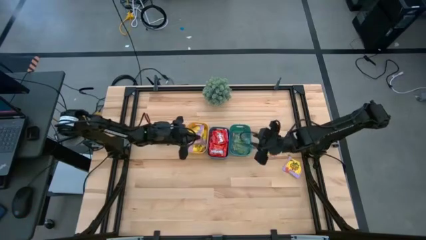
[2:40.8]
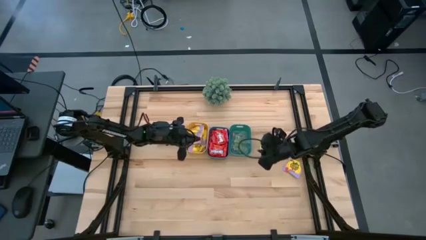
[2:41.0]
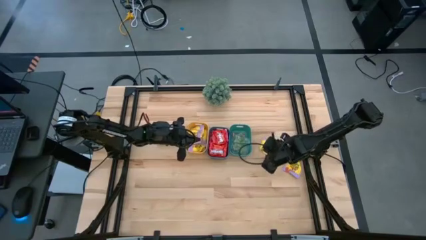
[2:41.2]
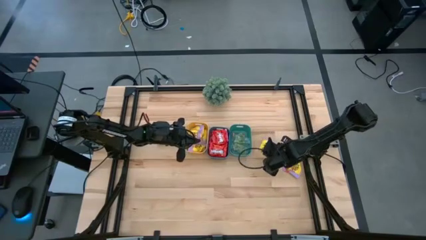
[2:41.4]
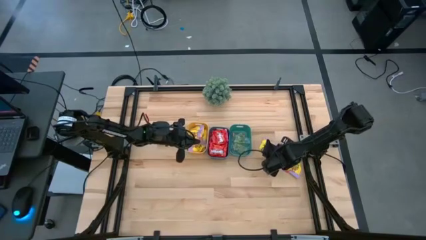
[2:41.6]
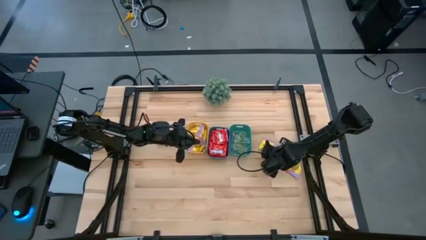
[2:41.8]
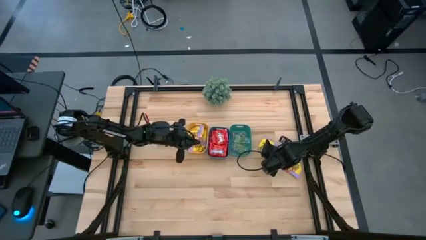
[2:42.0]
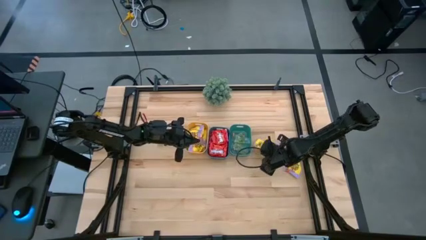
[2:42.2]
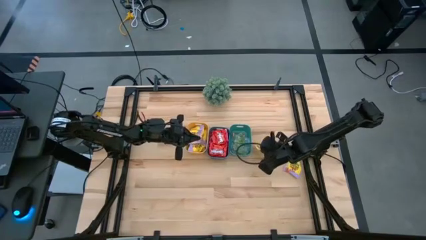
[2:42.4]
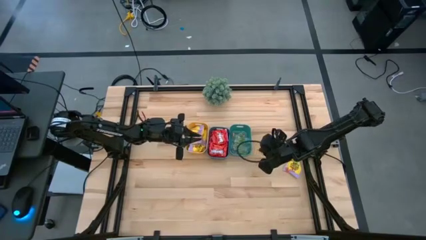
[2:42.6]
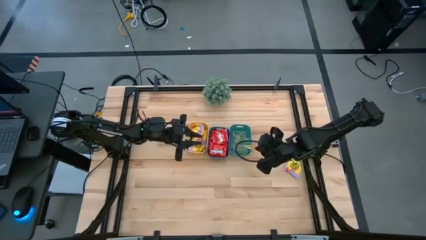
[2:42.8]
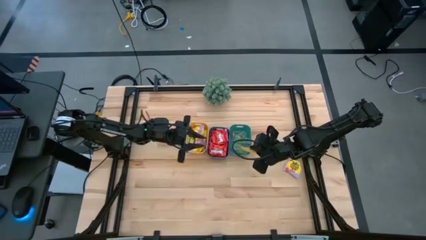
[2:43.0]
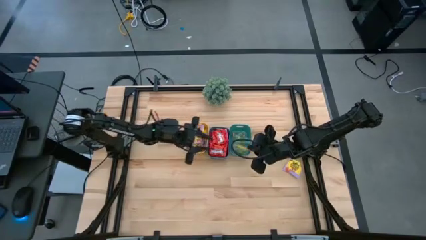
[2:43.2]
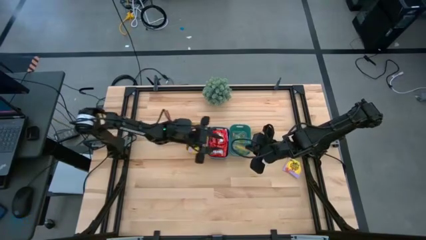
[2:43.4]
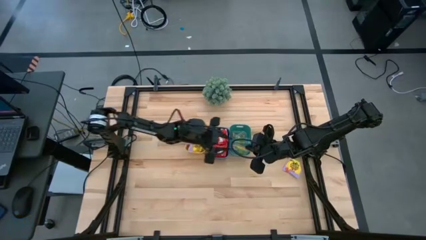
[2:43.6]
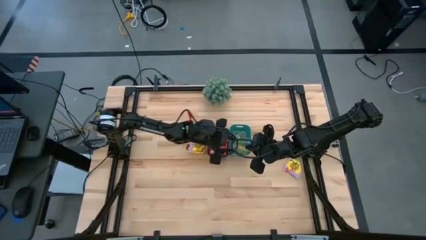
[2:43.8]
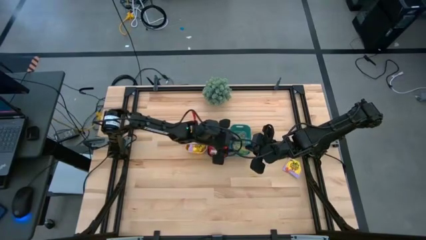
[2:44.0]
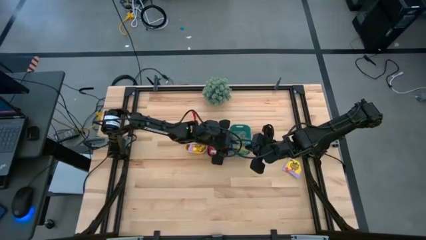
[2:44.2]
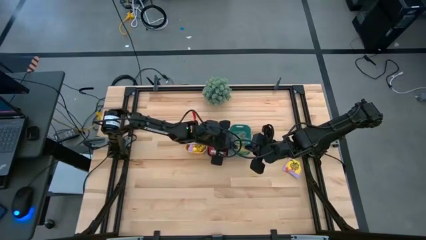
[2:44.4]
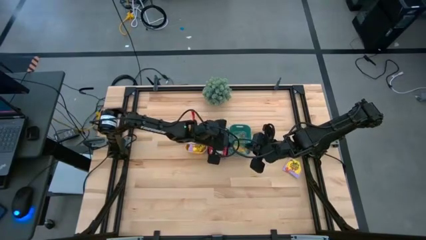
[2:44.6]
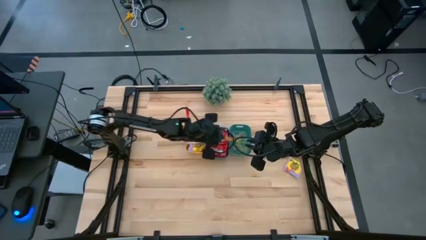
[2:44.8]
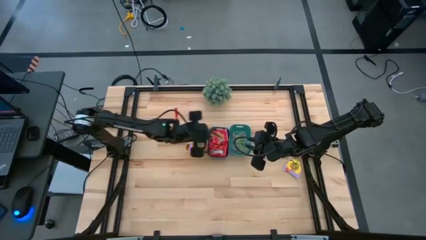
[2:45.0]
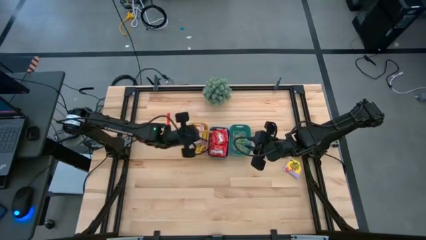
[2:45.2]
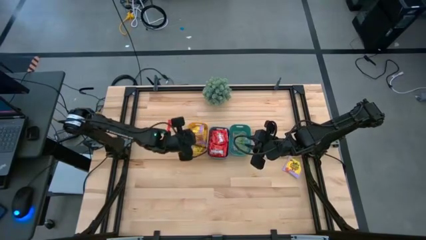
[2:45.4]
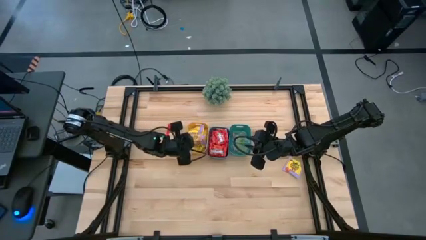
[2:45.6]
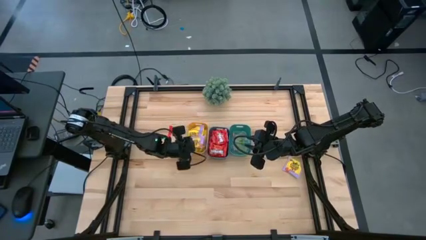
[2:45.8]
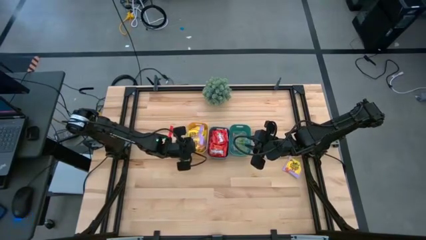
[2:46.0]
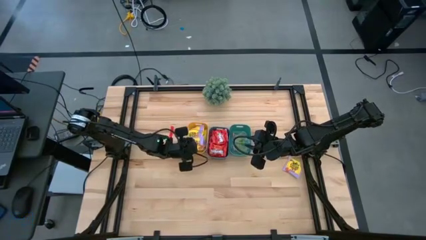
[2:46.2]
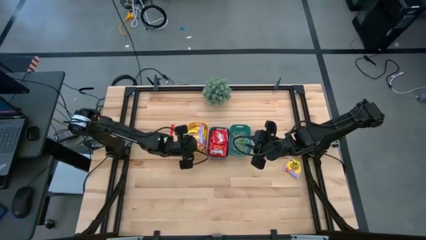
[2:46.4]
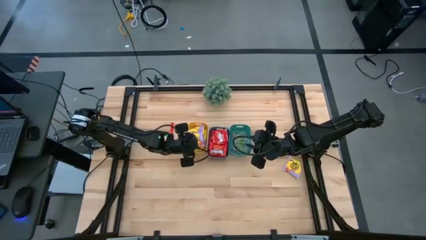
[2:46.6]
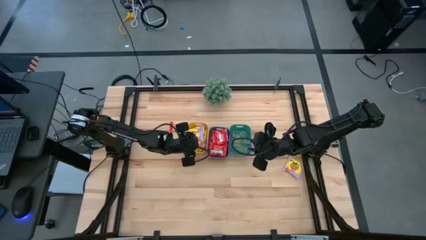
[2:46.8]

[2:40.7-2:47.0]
Task: Sort candy
Put the yellow candy pack into the yellow bin

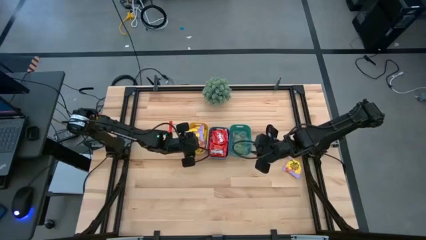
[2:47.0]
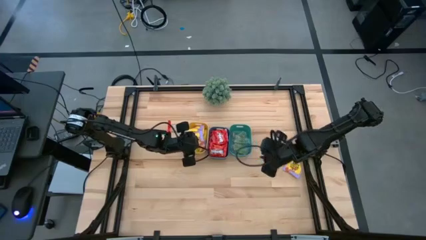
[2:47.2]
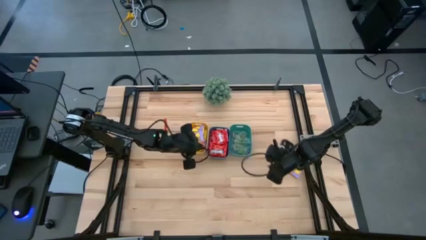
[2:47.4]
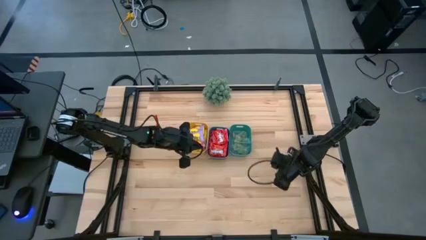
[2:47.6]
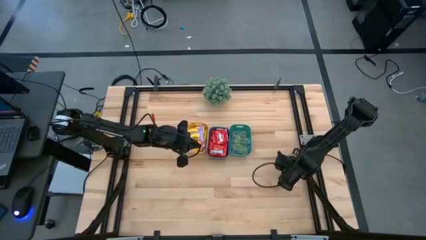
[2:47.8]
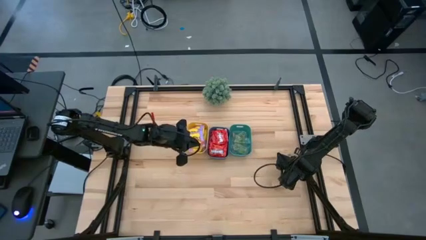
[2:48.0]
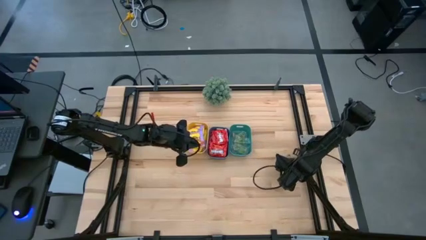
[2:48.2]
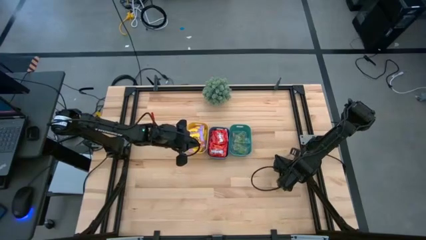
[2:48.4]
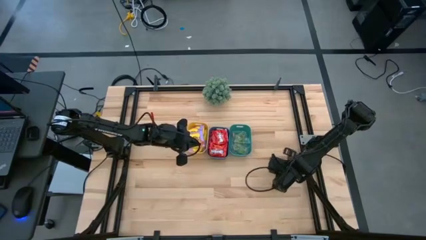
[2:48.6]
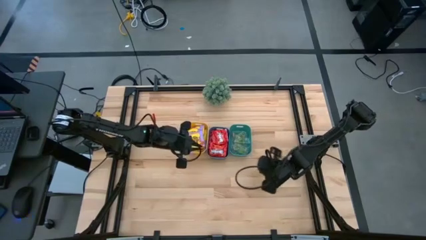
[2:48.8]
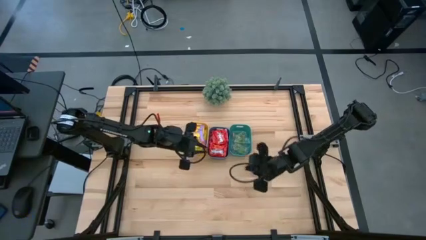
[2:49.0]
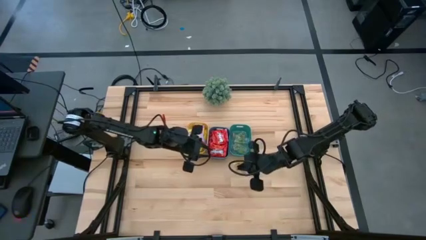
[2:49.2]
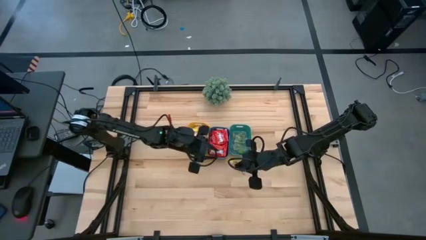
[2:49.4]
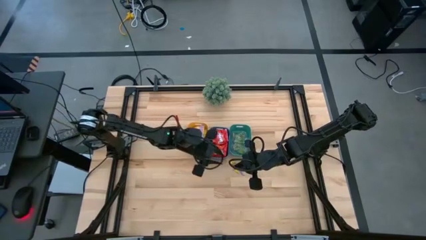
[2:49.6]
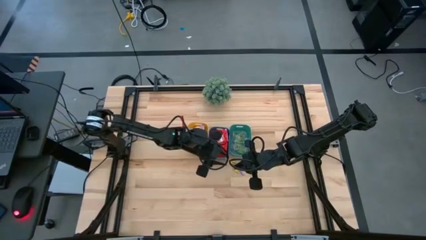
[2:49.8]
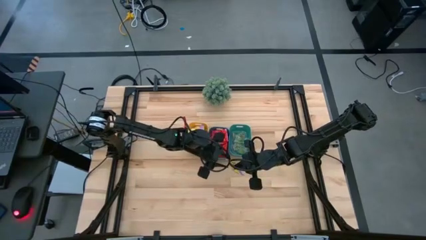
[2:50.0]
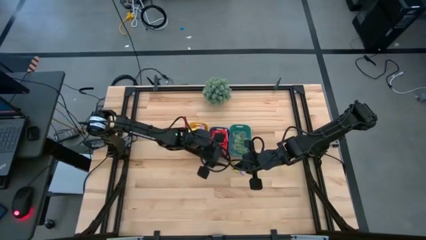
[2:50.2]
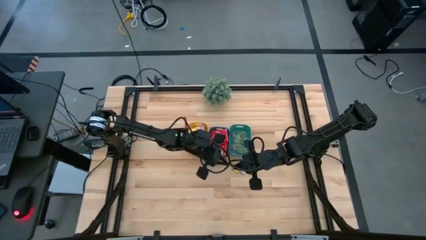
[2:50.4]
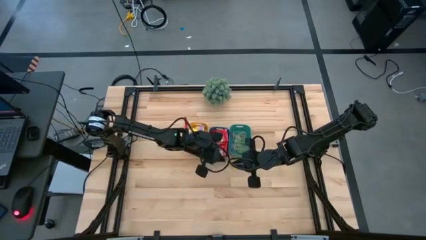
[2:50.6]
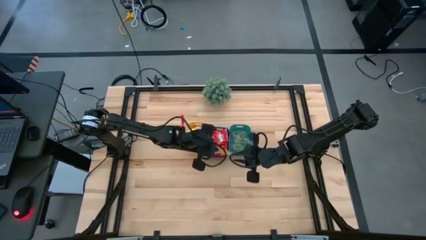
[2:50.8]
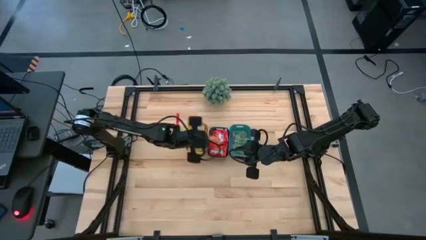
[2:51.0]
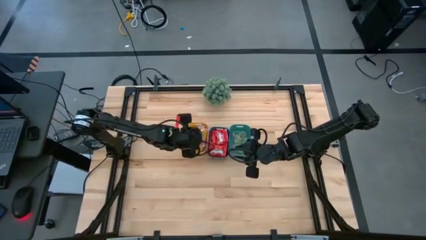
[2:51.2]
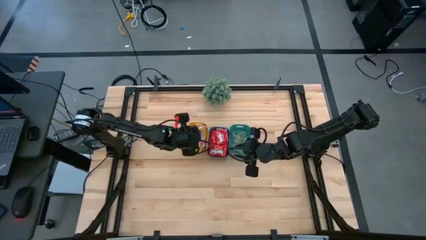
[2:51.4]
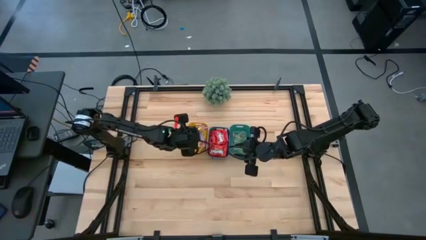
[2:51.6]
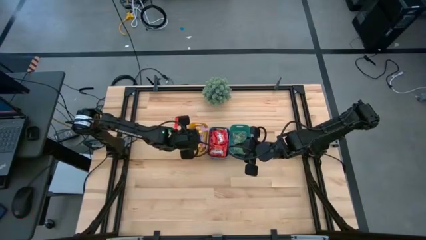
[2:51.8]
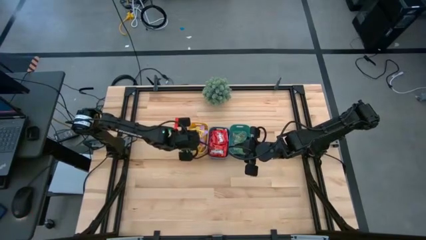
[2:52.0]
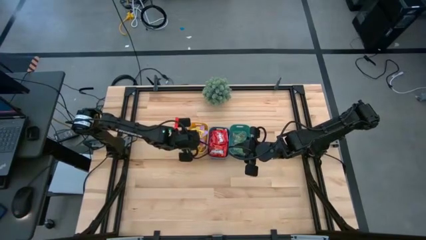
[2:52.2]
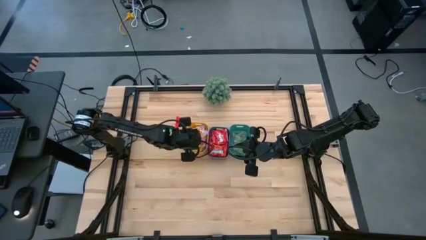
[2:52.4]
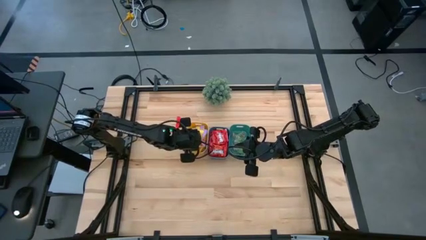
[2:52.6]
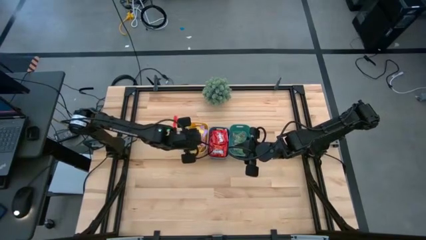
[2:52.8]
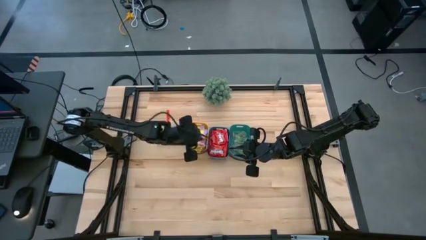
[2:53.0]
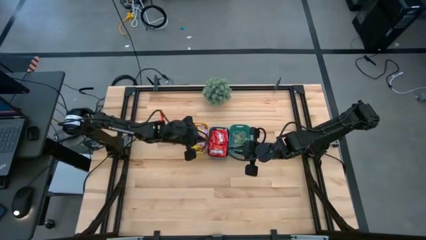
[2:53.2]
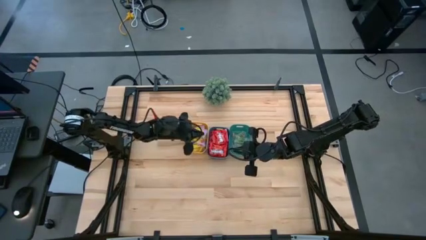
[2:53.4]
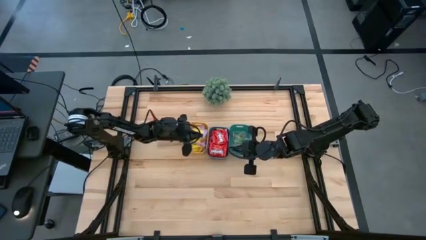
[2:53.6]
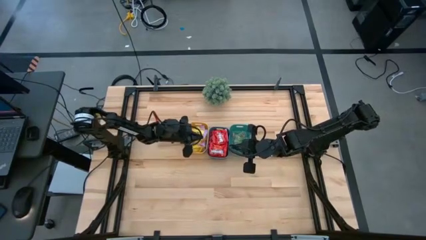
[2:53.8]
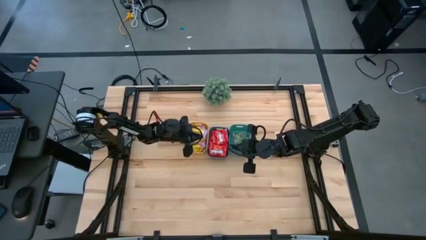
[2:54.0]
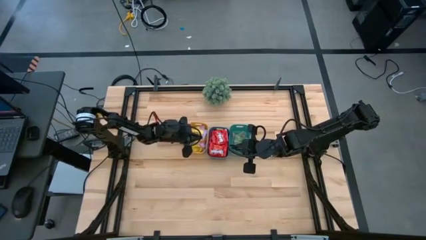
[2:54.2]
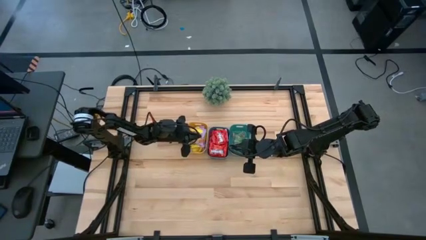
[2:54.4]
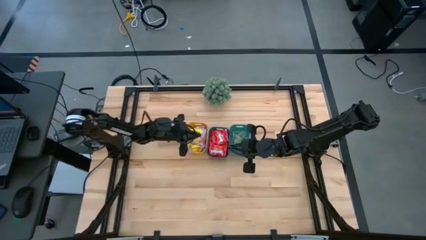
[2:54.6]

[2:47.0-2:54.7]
Put the yellow candy pack into the yellow bin

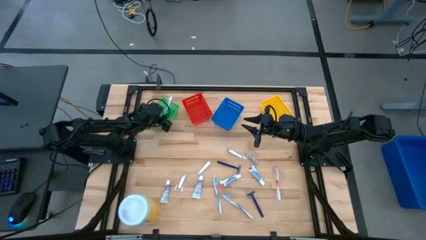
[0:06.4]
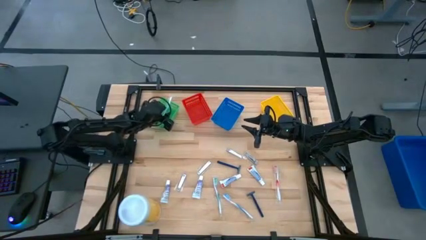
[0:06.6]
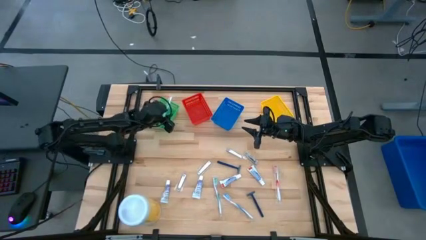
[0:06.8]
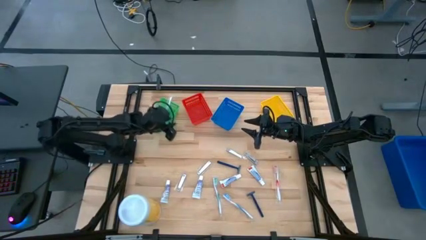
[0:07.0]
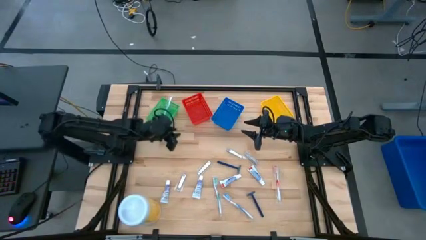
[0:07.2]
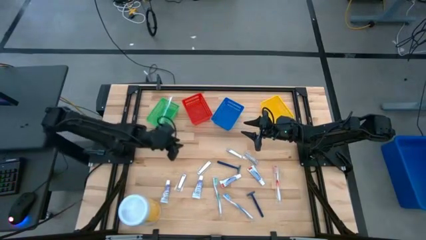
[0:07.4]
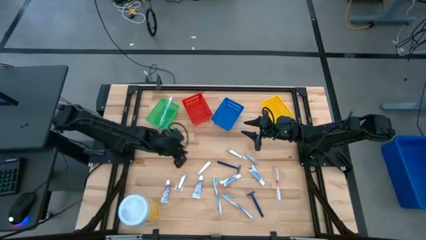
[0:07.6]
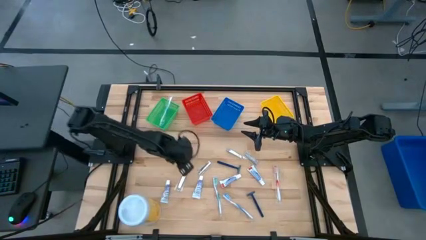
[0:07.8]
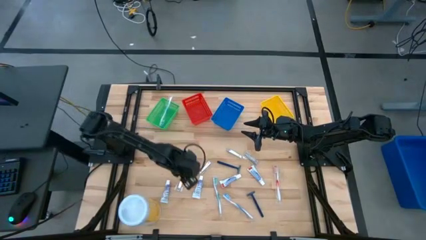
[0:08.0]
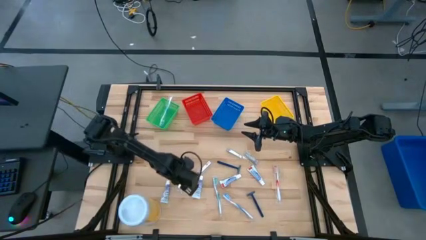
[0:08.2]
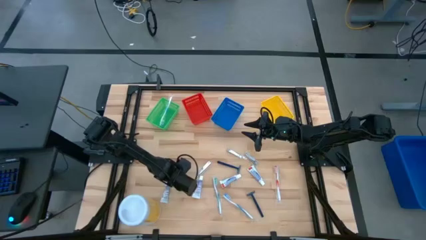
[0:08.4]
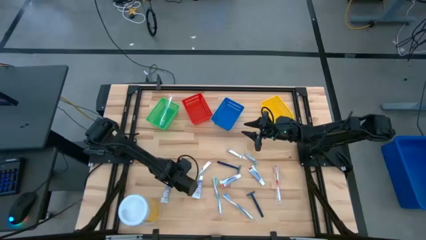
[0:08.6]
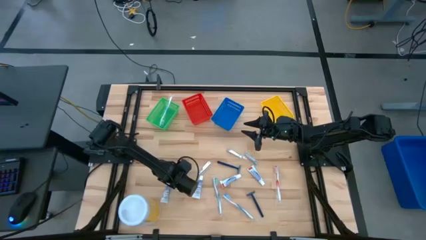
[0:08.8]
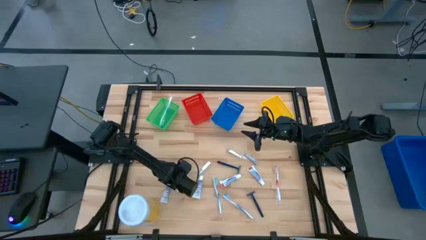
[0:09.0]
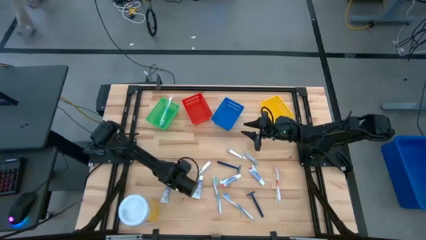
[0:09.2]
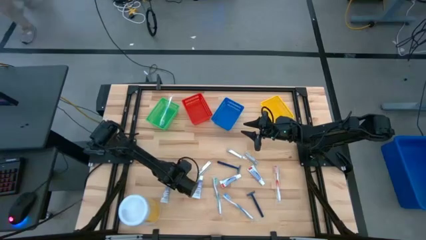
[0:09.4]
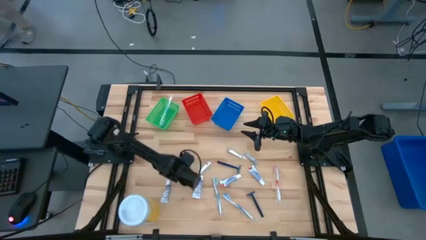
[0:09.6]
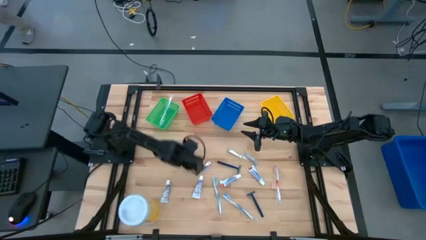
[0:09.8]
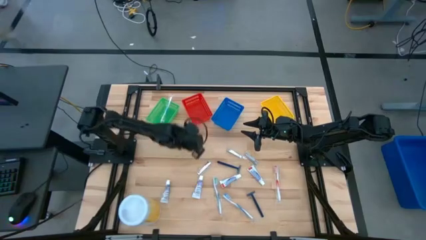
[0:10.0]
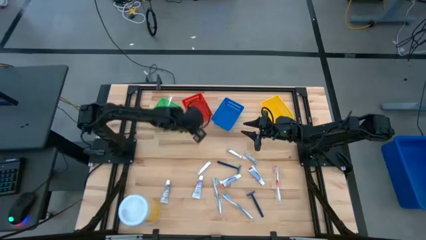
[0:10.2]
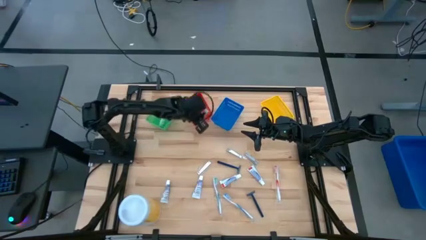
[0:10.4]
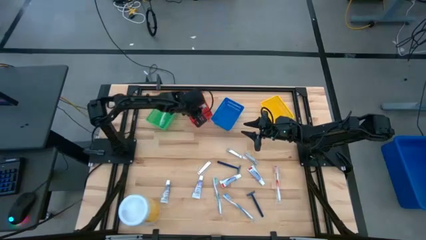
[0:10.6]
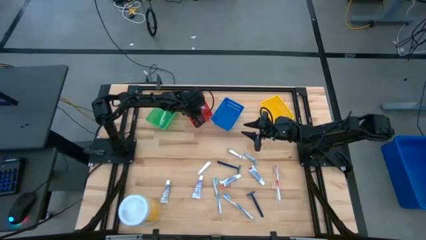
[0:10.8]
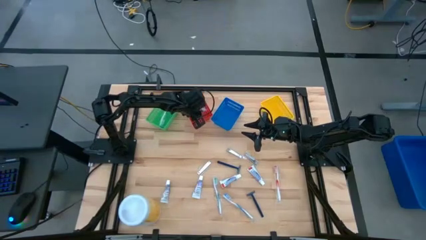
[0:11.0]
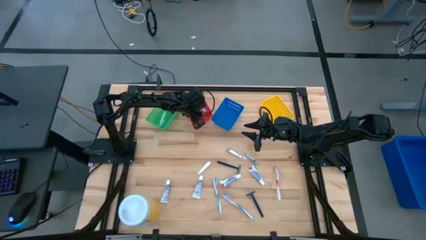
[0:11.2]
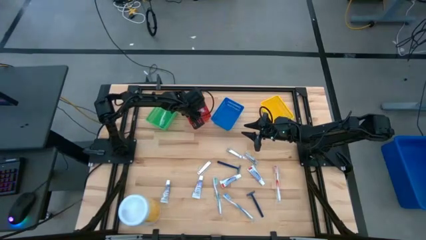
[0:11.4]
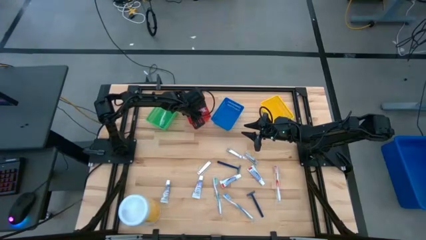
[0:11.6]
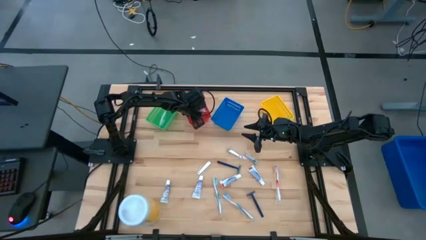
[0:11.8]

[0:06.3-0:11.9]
Task: Pick & Place Travel size toiletries
Put the nail cutter into the red basket
